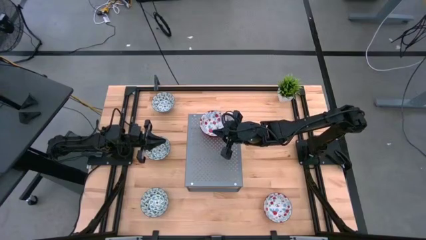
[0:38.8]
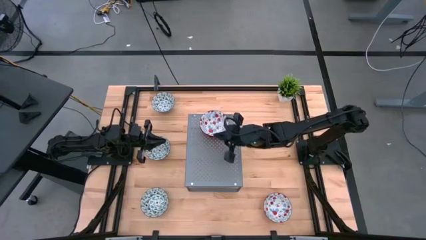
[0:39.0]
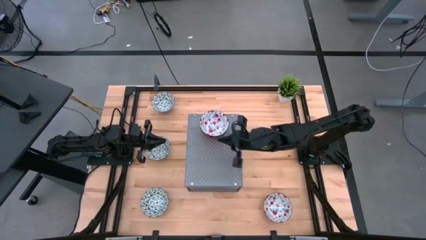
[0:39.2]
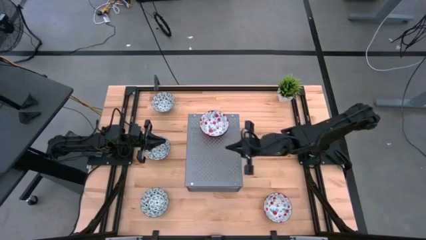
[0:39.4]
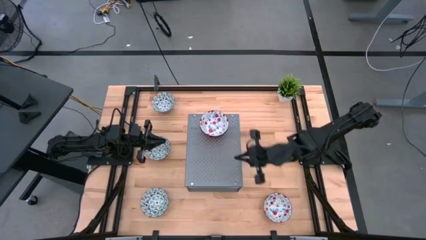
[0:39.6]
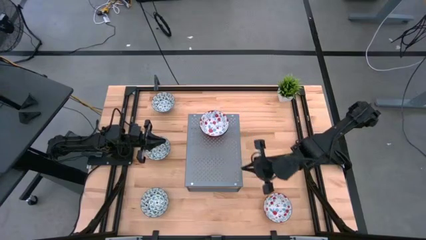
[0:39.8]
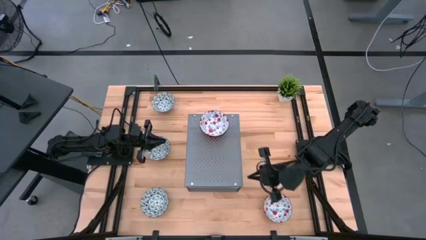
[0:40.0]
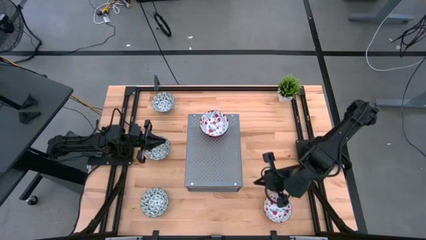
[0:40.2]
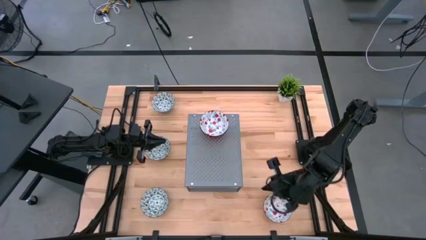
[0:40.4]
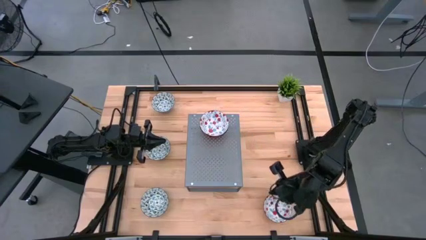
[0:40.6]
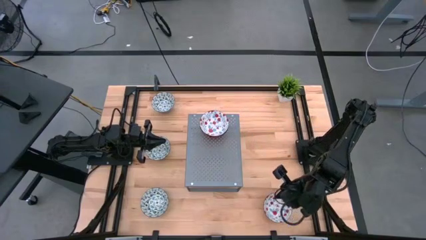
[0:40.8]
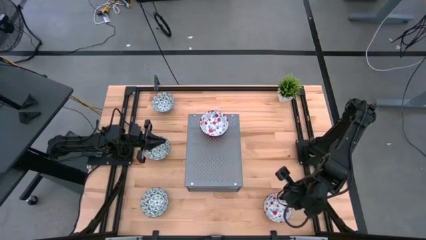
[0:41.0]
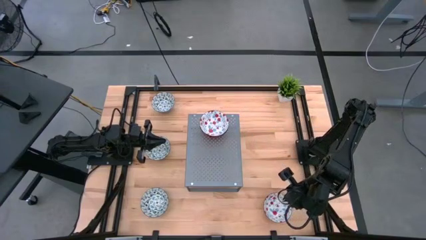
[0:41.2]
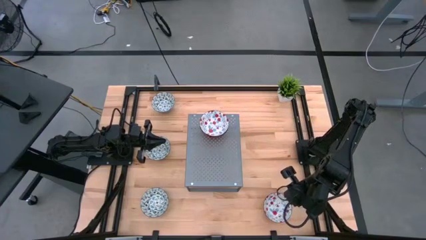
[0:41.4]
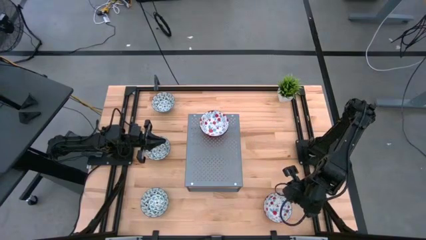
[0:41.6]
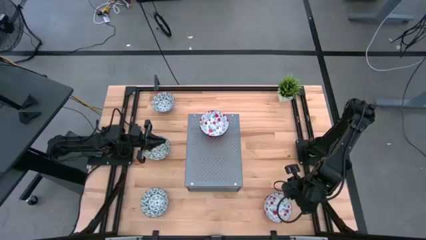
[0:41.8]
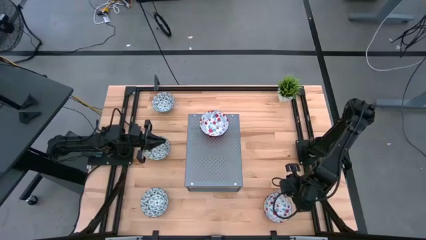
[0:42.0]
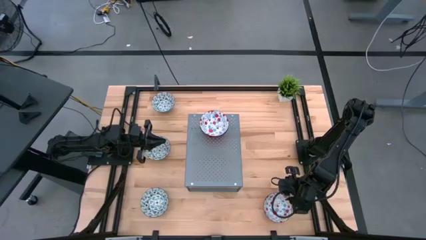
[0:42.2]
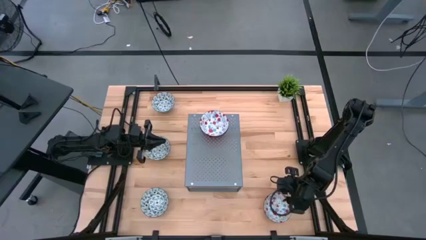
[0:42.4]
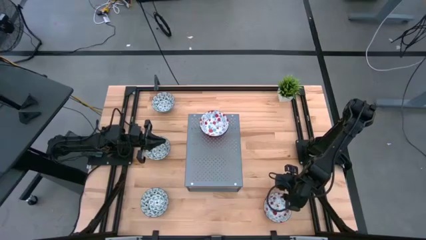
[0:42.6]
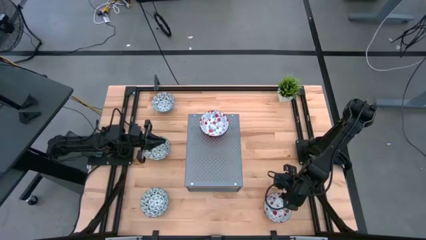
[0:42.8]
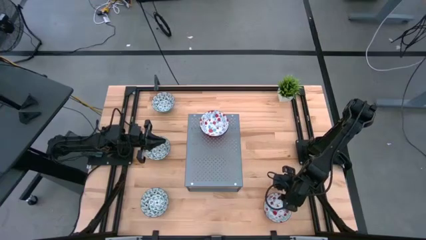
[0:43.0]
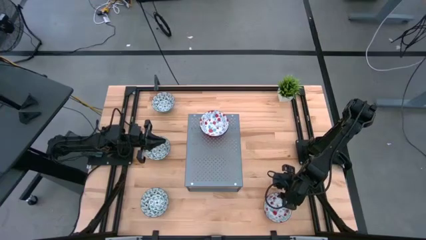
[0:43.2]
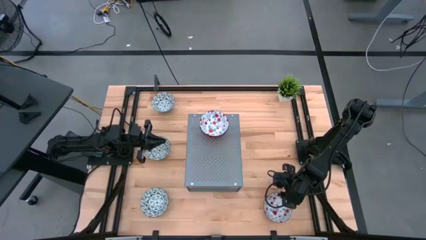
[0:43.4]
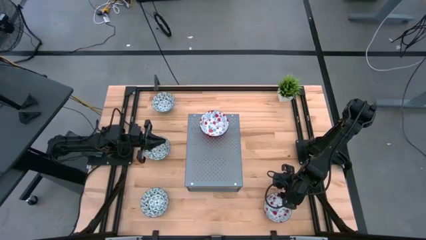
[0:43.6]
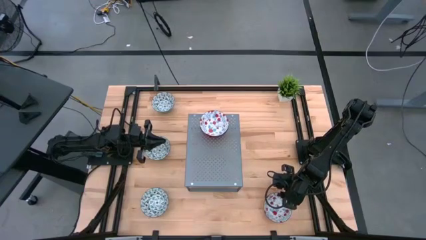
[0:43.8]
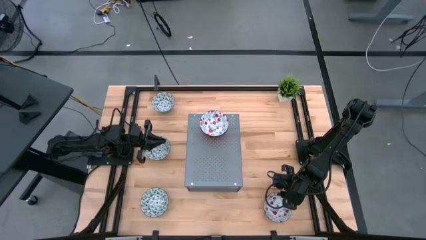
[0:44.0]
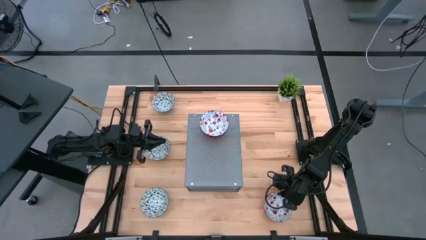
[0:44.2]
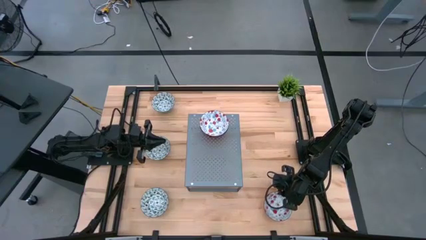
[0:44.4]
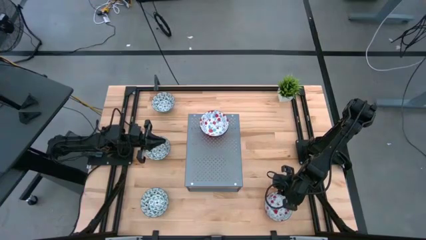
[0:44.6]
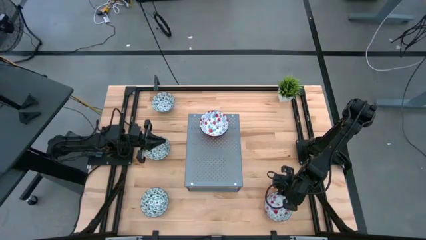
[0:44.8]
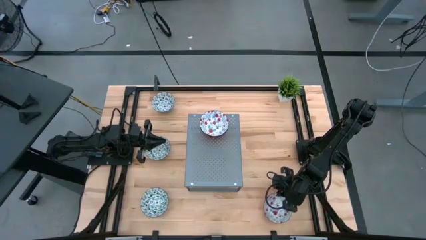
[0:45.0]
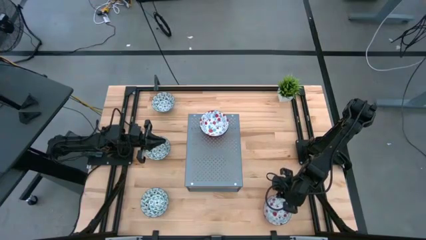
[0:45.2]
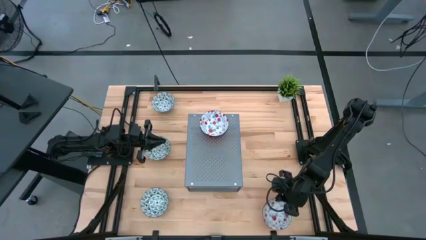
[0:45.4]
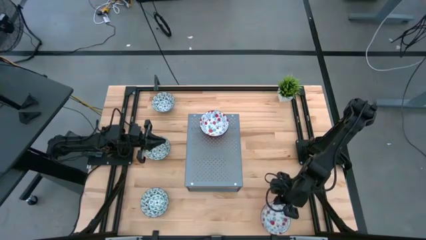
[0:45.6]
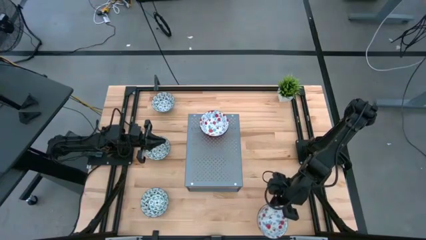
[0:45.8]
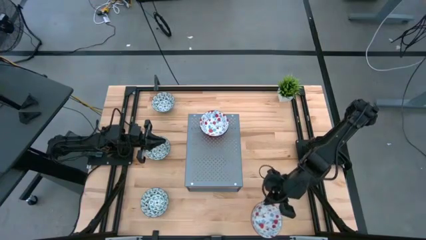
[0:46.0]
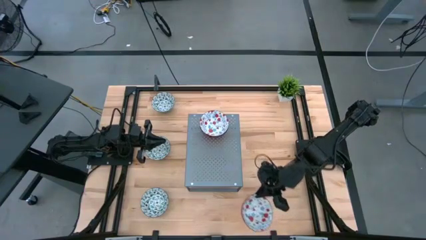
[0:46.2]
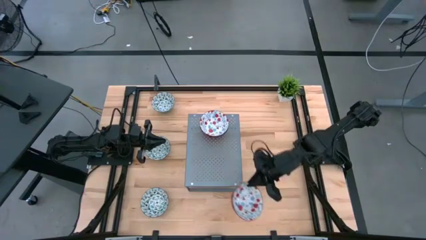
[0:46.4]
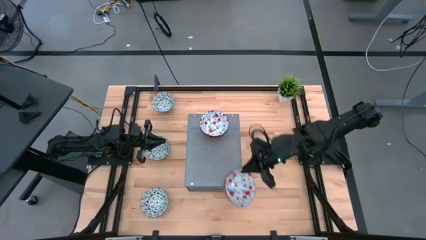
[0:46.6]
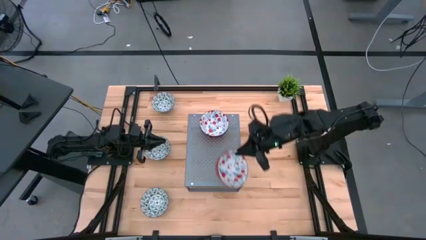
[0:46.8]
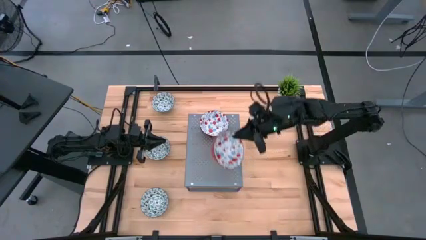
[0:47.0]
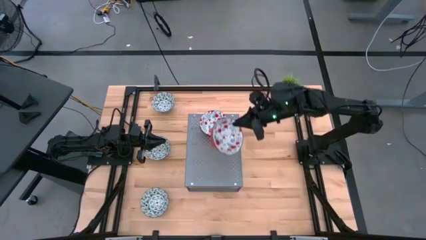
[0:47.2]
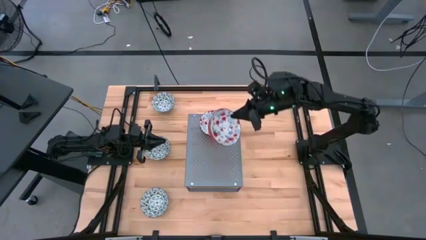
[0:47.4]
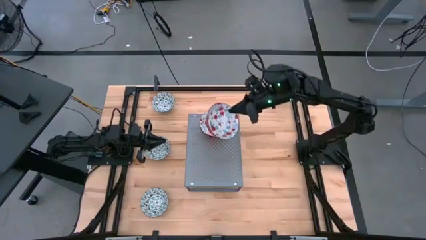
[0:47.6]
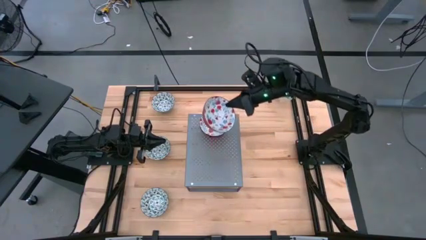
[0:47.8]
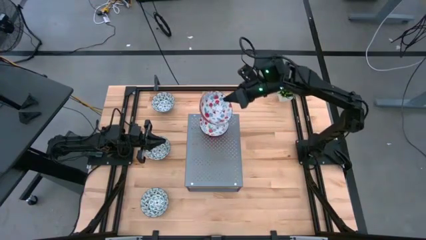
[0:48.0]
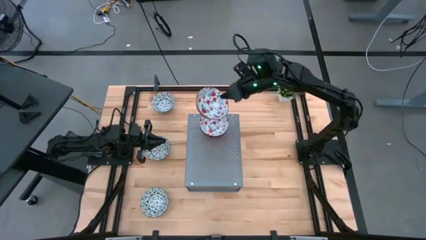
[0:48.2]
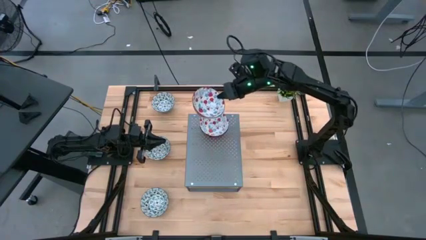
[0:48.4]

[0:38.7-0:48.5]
Task: Pick & Place Mini bowls
Put the red bowl on top of the red bowl on the shelf

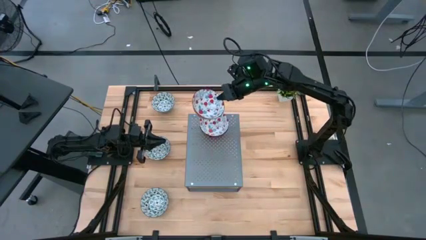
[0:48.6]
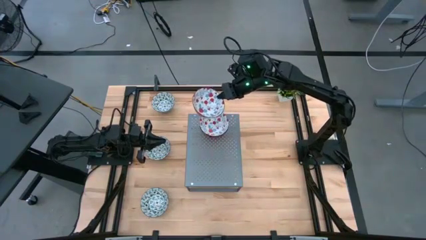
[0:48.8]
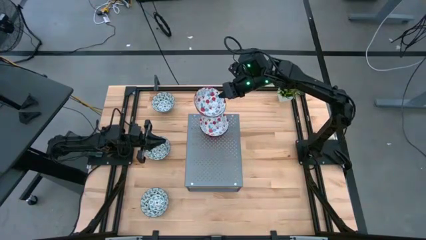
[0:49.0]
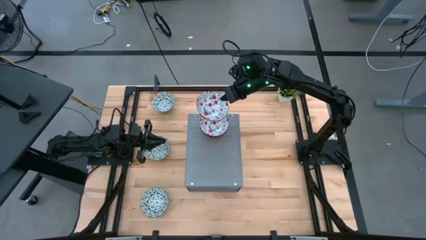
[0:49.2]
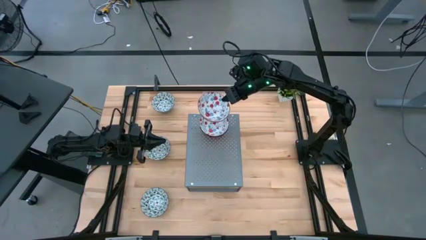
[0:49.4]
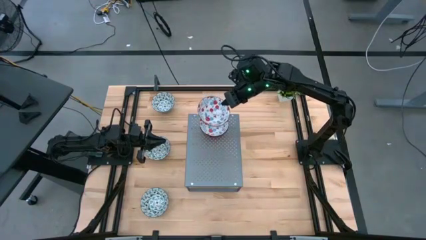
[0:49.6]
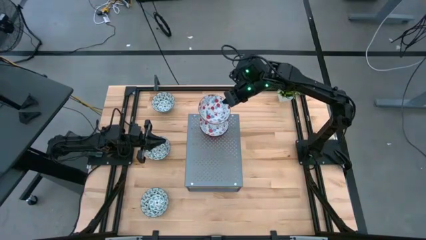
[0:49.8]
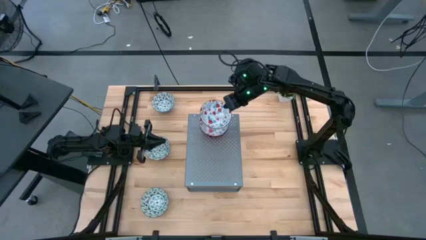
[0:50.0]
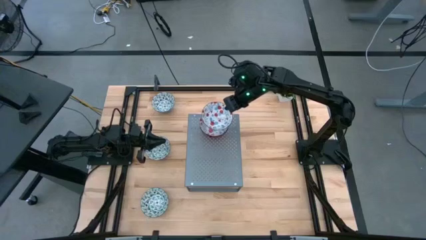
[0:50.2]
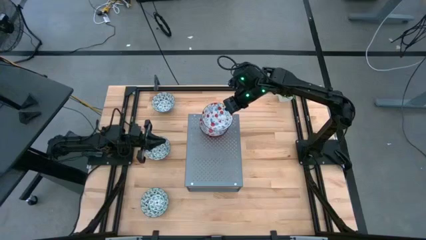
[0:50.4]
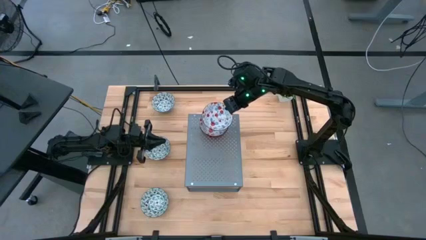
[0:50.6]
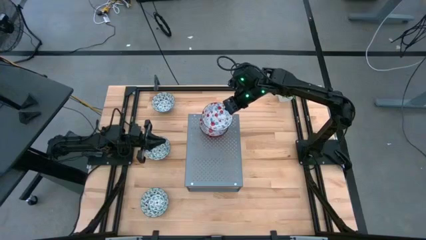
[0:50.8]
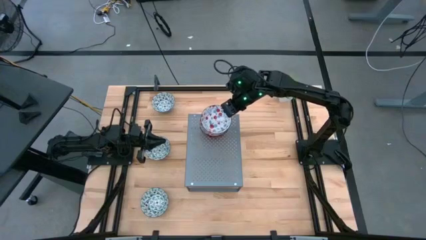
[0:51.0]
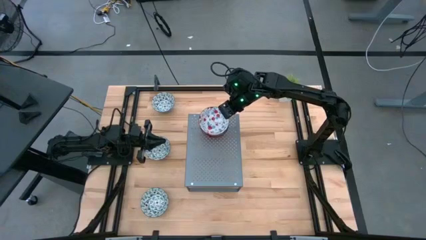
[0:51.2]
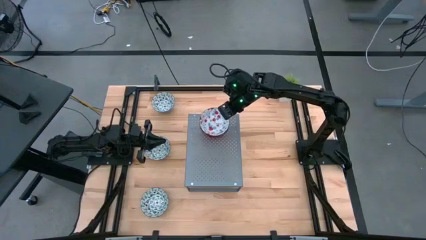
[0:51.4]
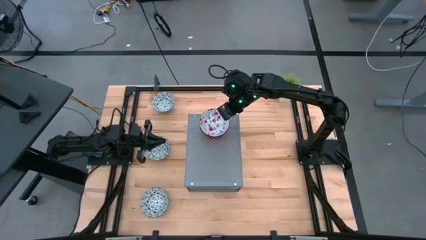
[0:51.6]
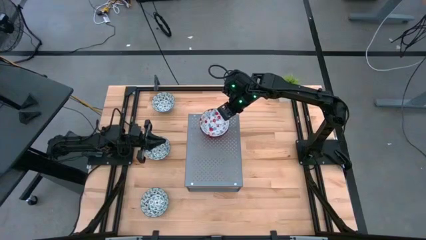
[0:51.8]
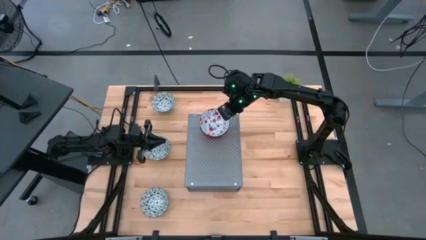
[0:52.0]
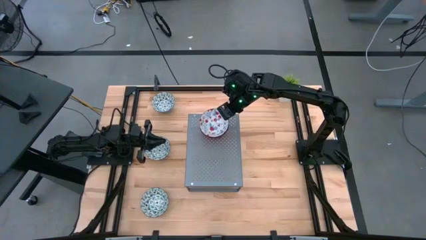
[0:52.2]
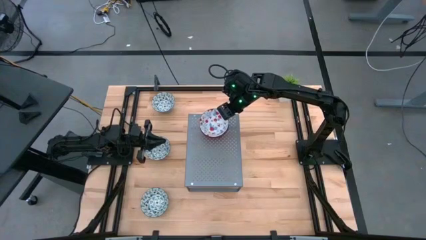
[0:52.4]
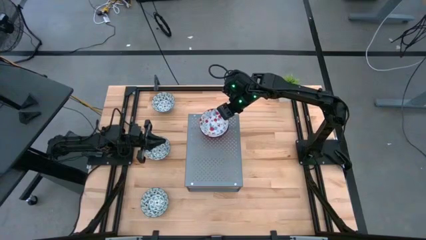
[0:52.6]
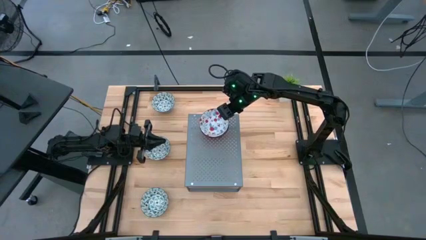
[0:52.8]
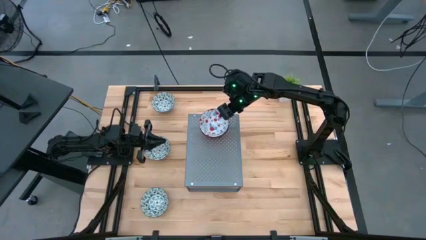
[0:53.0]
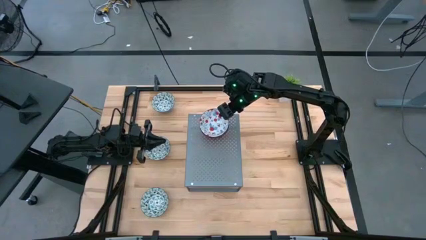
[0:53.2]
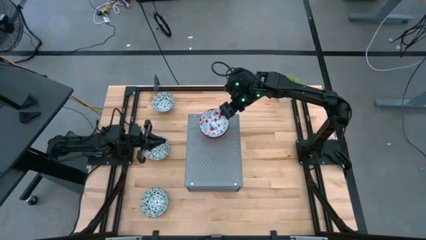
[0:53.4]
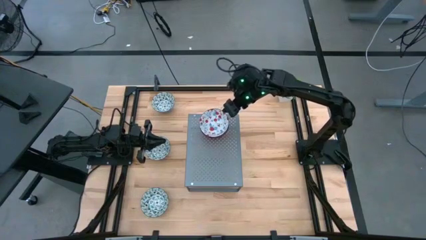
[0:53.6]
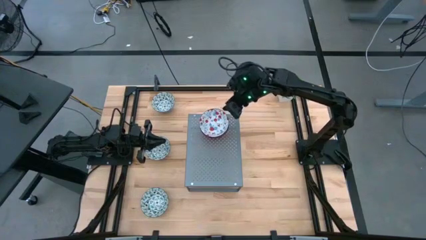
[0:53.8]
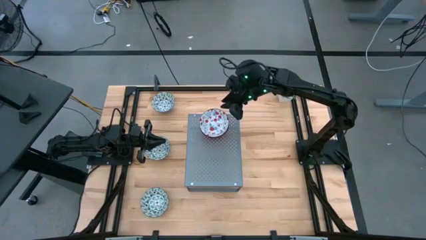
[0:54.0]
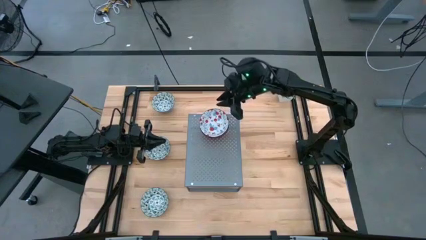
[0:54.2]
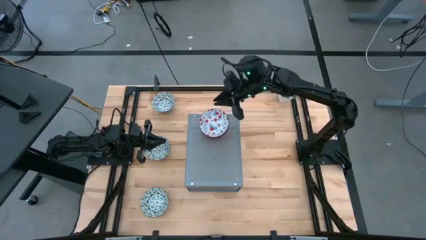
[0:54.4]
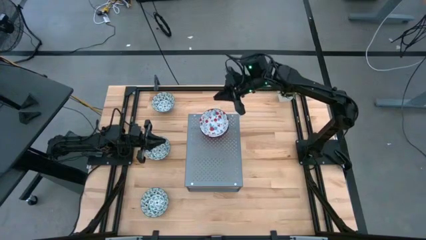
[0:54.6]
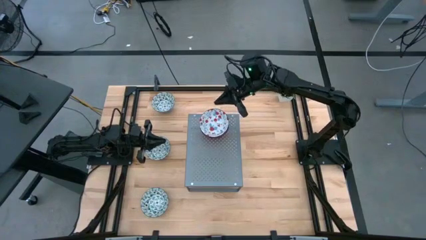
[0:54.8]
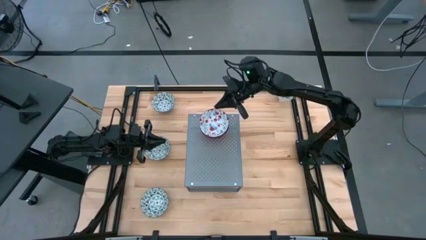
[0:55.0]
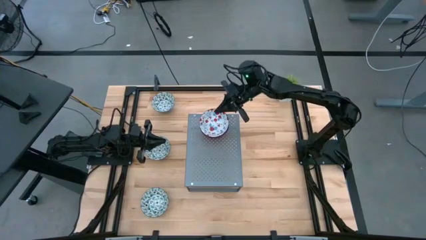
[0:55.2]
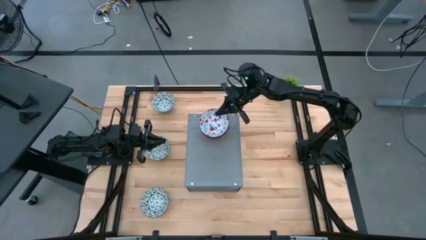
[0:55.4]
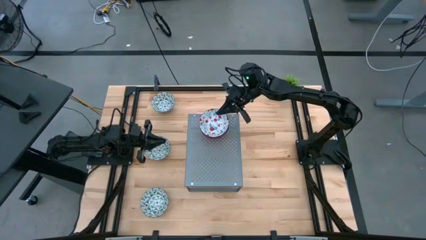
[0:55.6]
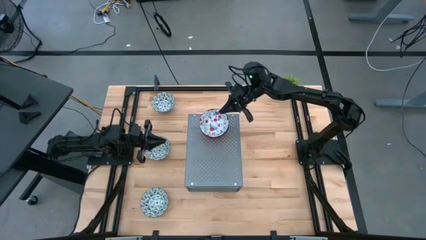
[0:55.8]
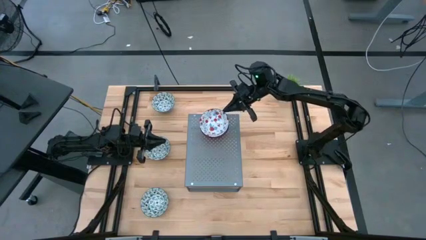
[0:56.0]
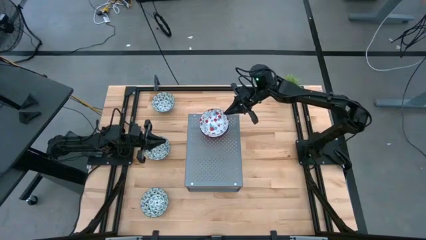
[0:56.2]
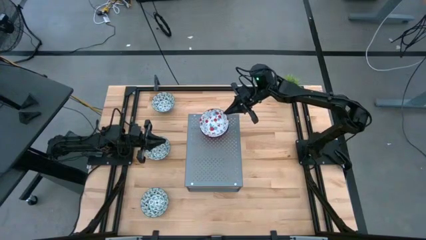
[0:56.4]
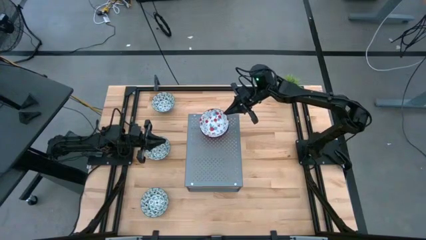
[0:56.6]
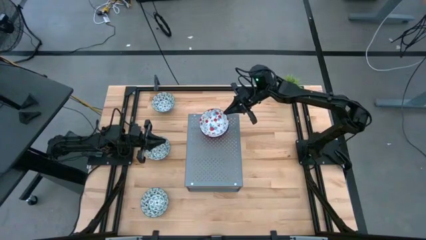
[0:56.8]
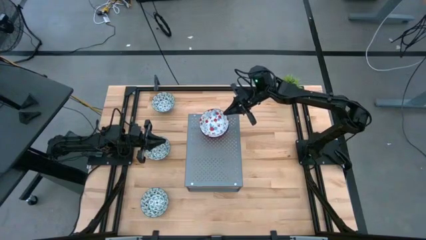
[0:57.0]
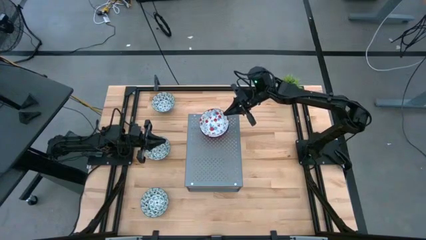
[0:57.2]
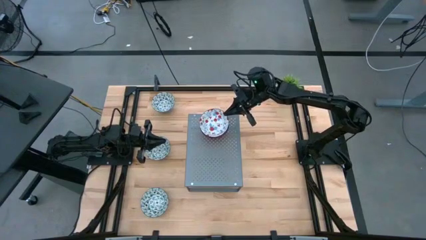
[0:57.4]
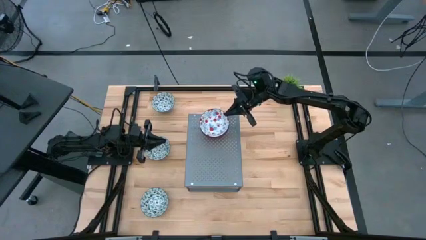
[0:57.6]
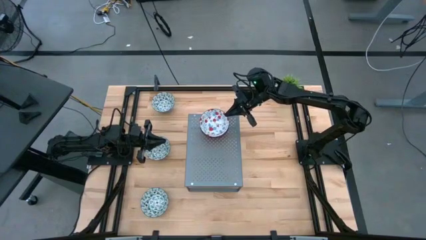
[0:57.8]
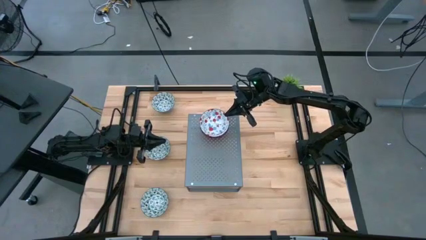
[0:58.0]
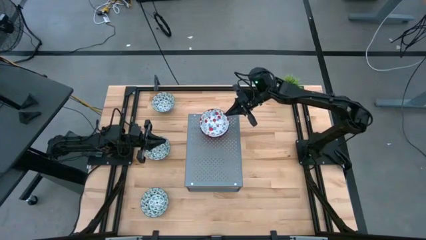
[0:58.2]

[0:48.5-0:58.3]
Put the red bowl on top of the red bowl on the shelf
